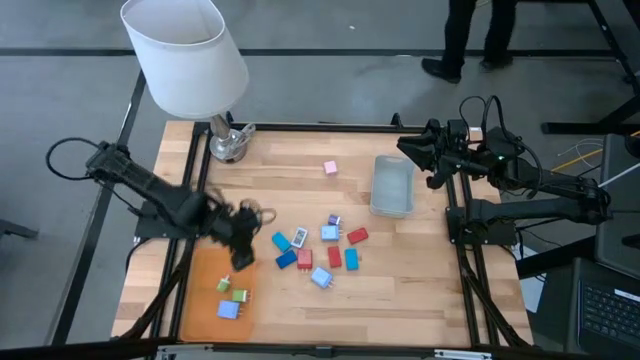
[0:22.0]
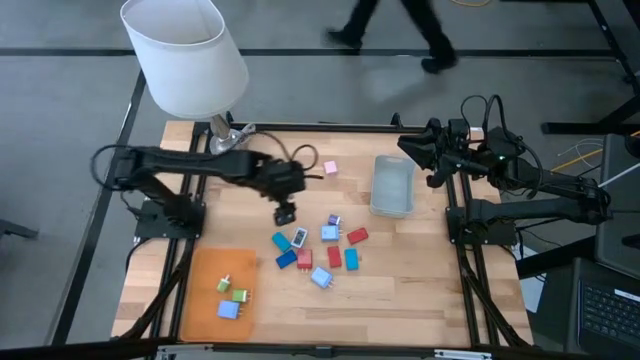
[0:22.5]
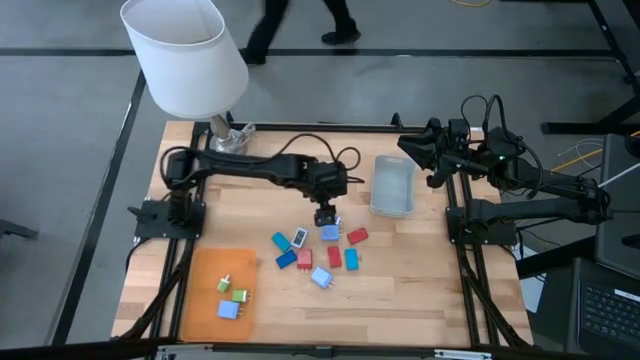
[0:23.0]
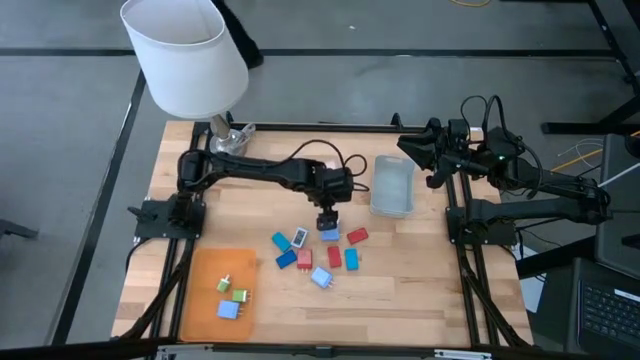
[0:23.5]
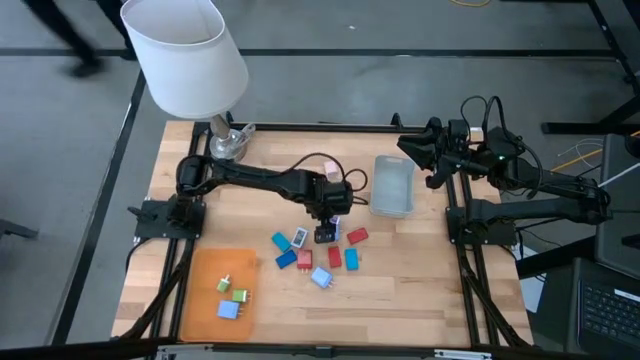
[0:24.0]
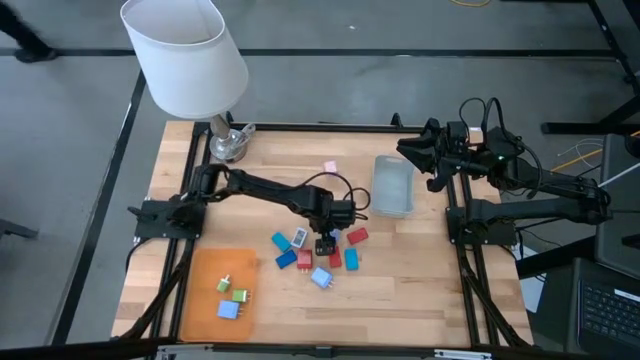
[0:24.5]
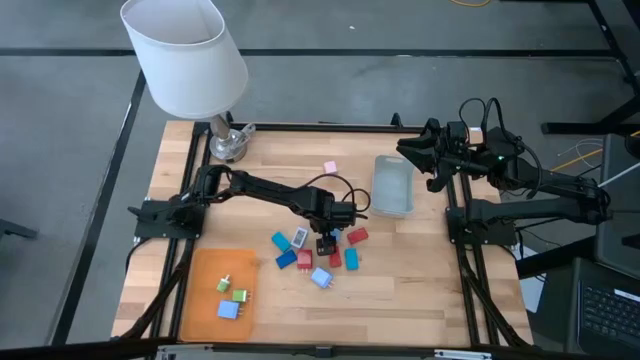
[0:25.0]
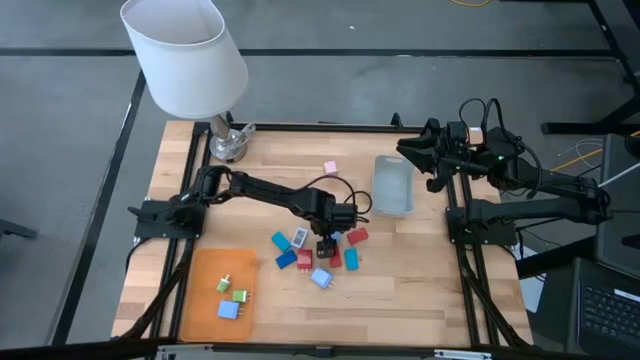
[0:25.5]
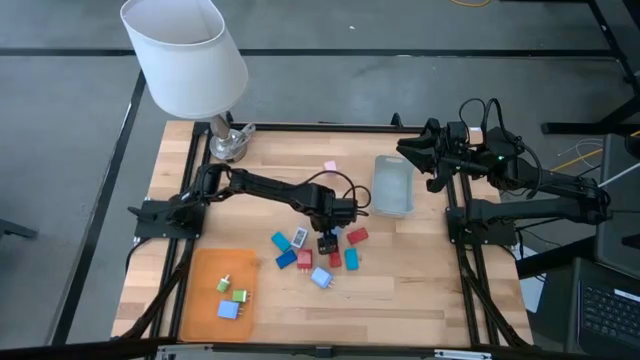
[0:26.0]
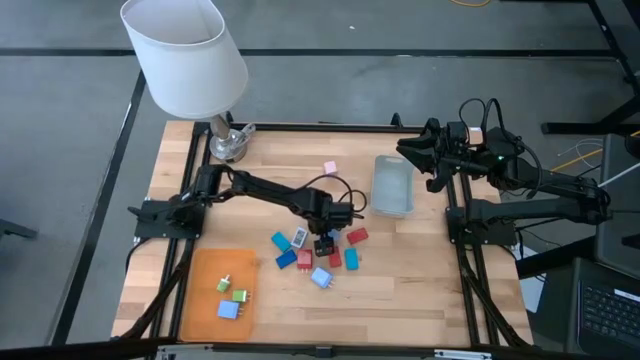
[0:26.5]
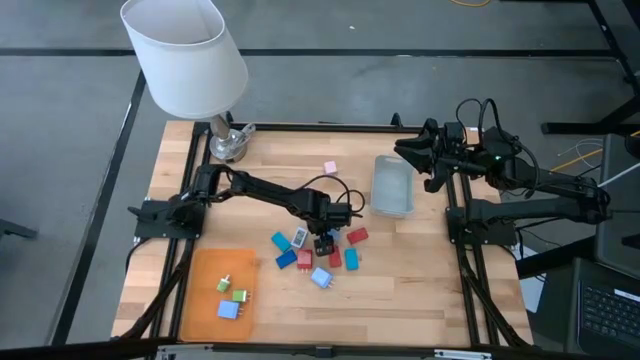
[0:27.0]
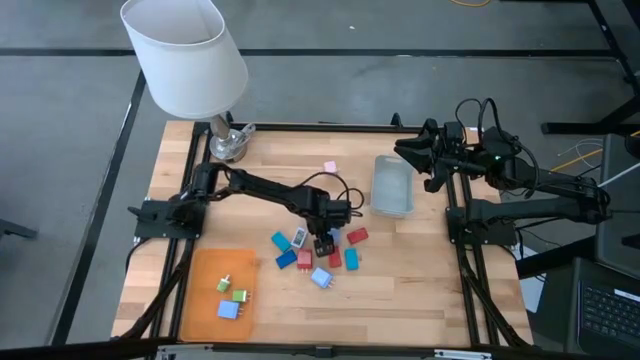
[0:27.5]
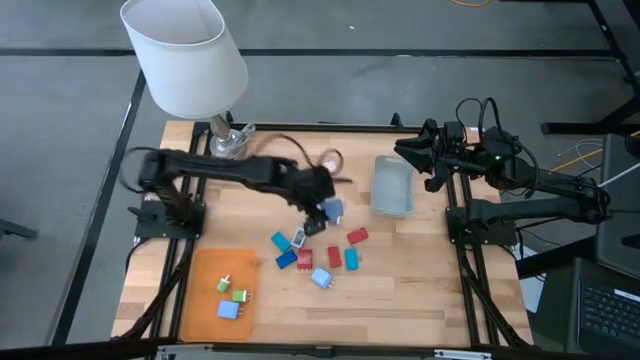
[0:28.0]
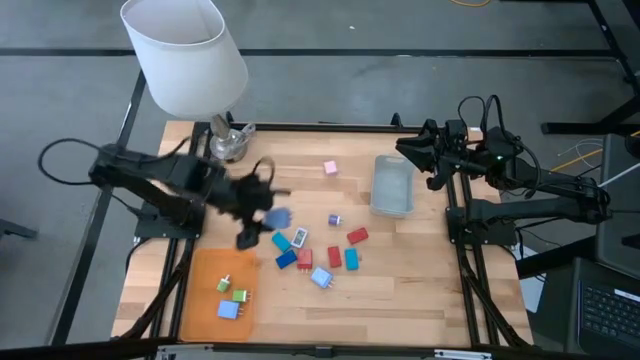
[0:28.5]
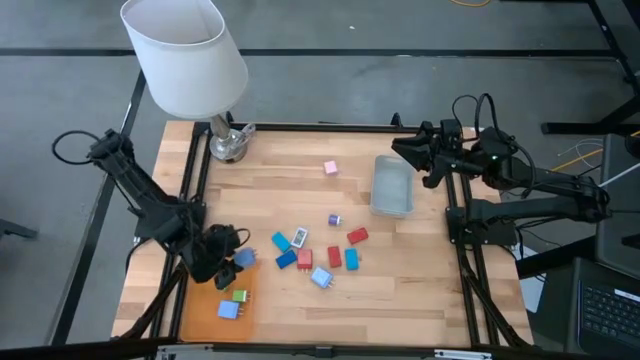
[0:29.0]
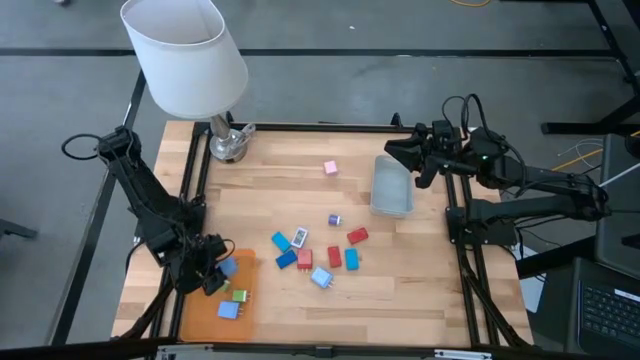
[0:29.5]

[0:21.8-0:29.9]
Task: Pick & Place Office items
Put the top light blue charger adapter into the orange bin

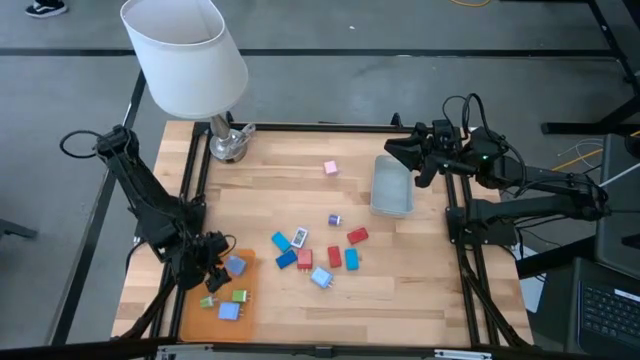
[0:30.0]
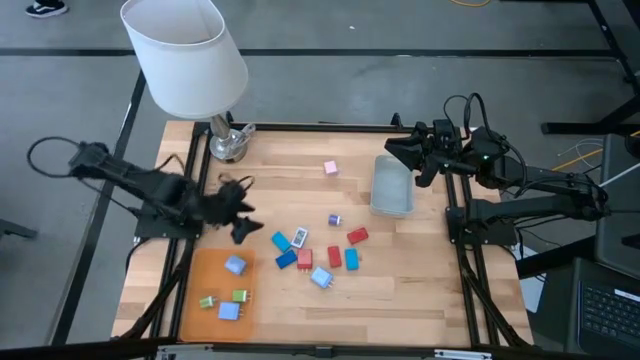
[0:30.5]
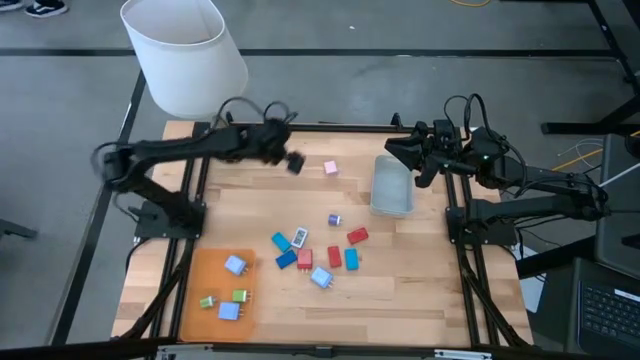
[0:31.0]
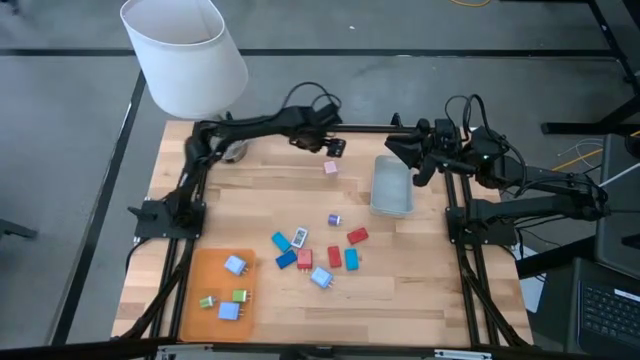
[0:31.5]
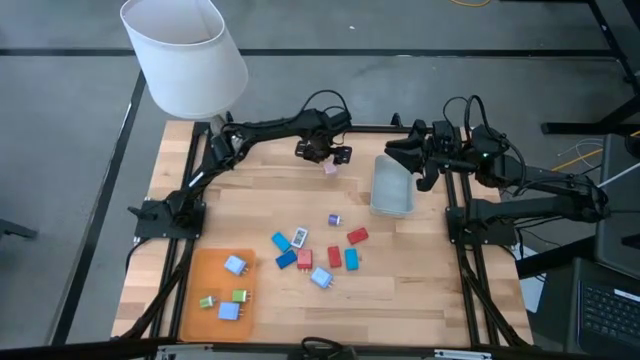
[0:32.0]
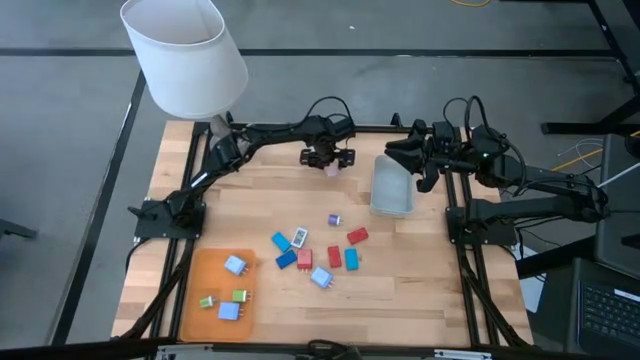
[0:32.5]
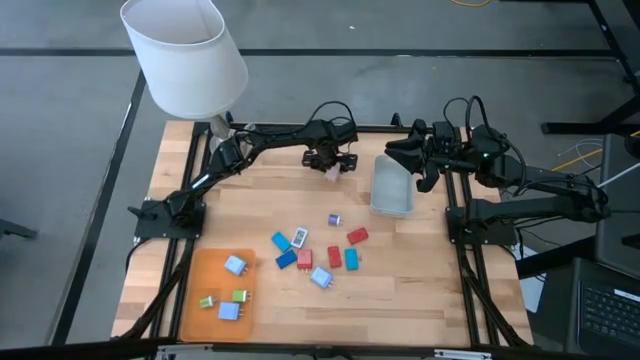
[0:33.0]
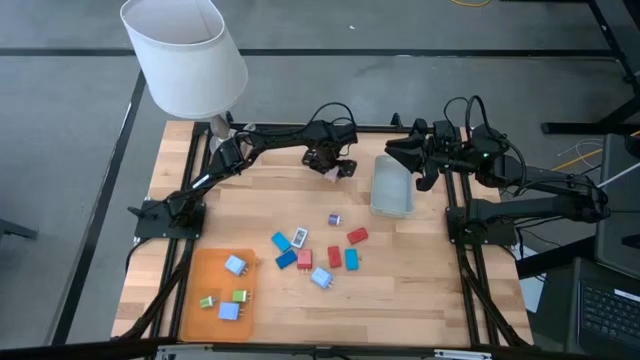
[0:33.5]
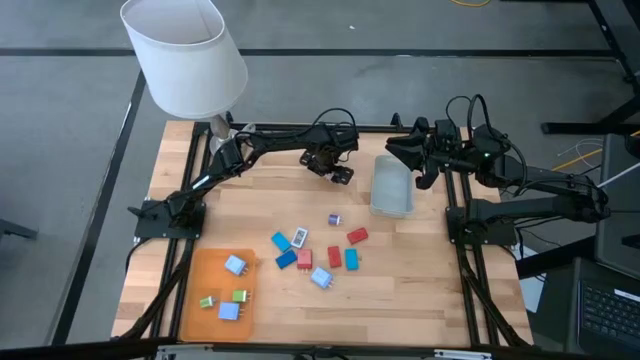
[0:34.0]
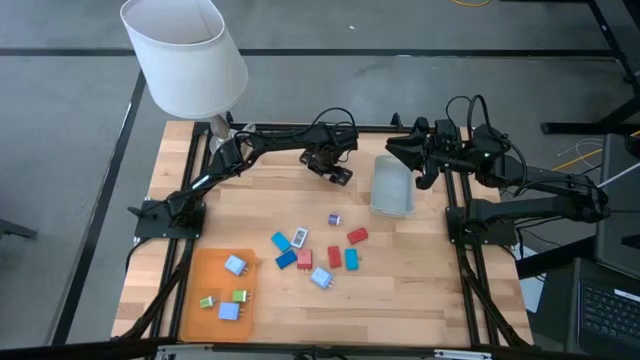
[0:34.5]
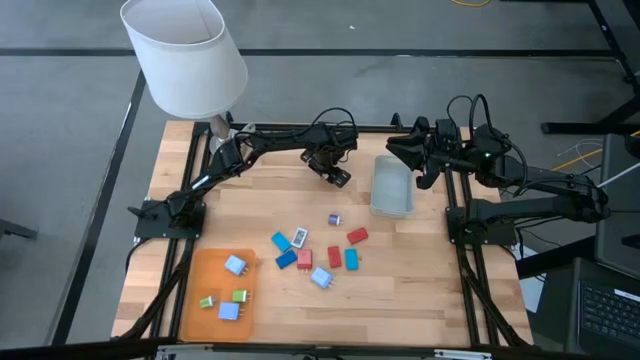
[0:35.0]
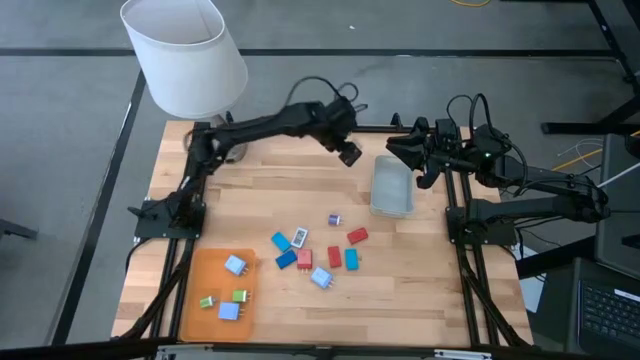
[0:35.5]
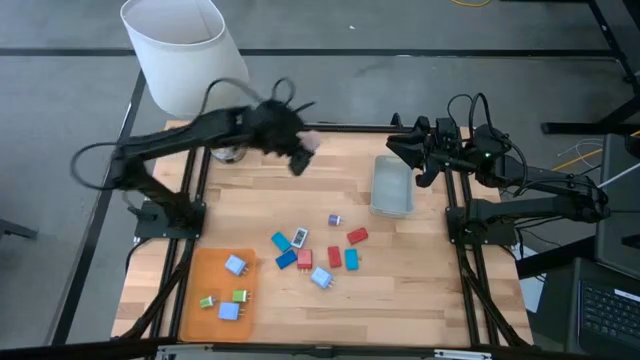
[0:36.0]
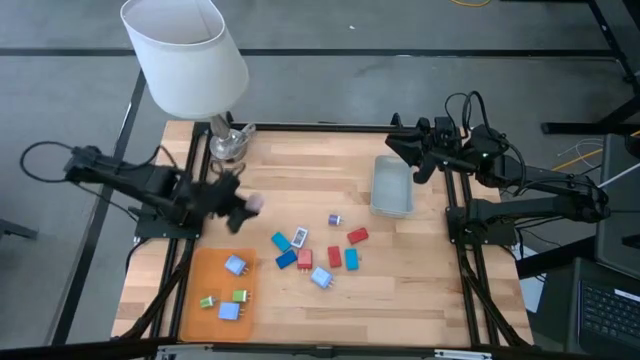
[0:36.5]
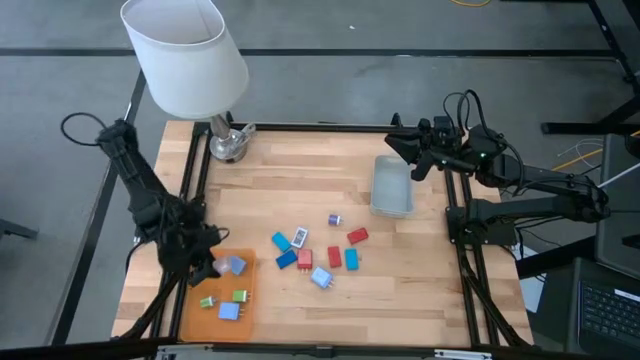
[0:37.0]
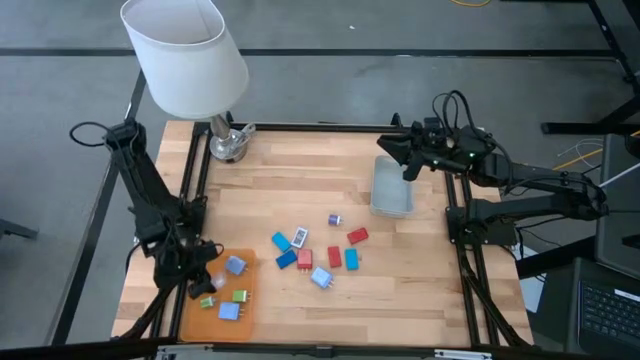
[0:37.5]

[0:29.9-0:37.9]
Put the light pink charger adapter into the orange bin

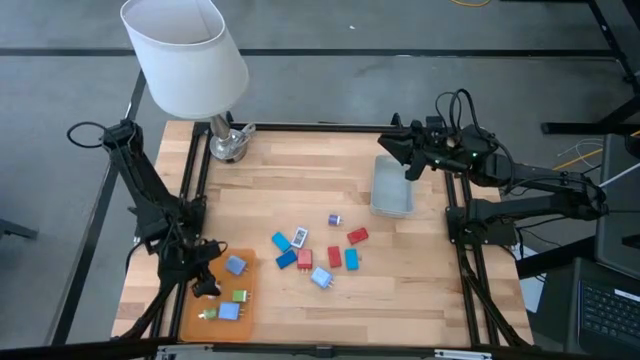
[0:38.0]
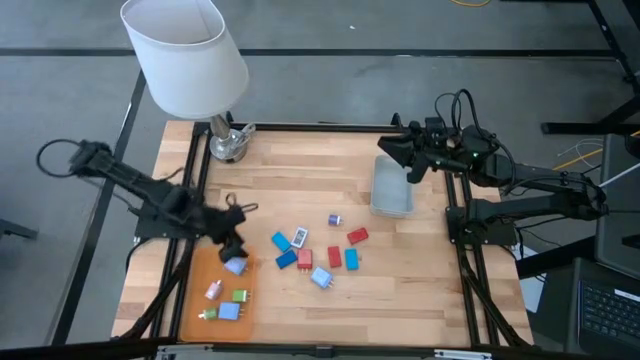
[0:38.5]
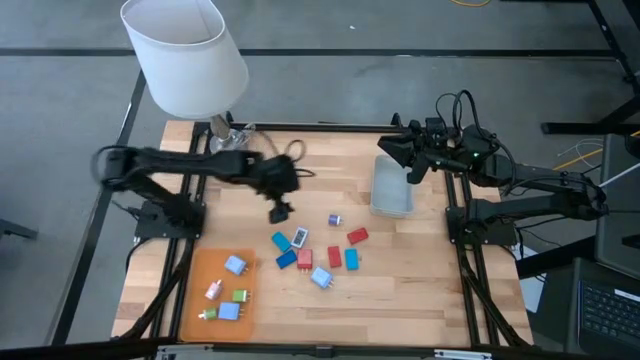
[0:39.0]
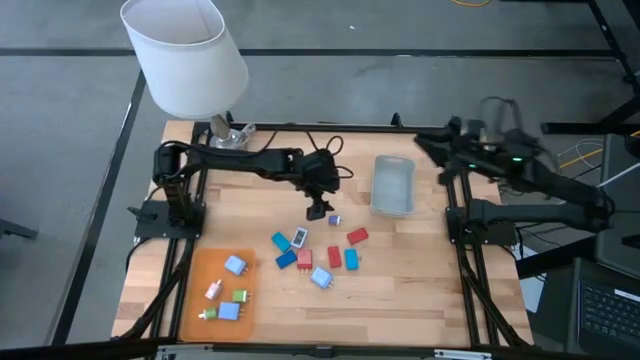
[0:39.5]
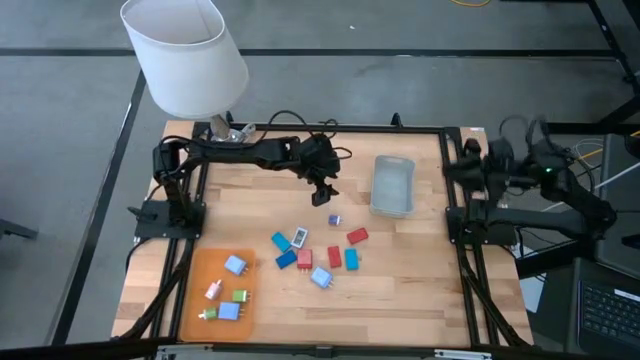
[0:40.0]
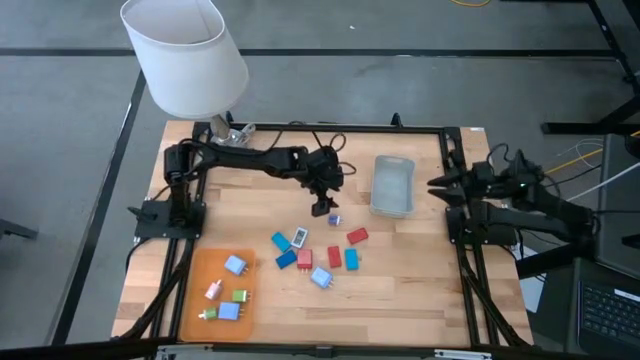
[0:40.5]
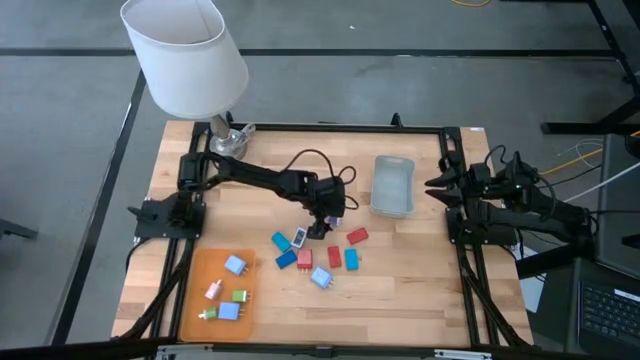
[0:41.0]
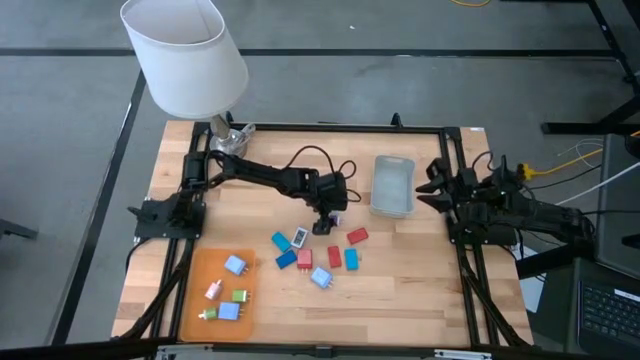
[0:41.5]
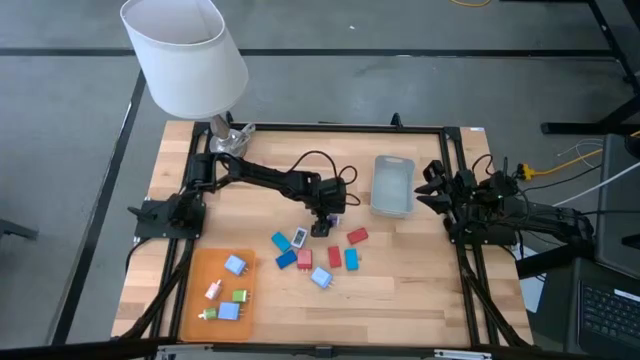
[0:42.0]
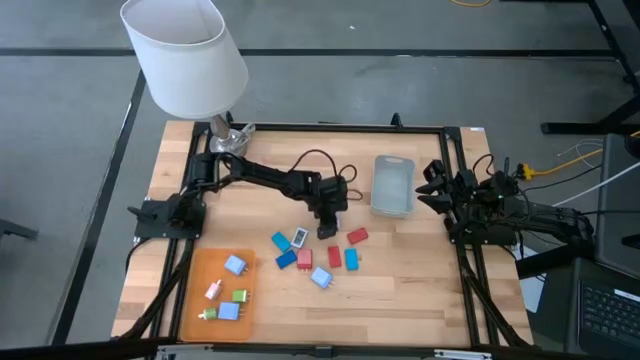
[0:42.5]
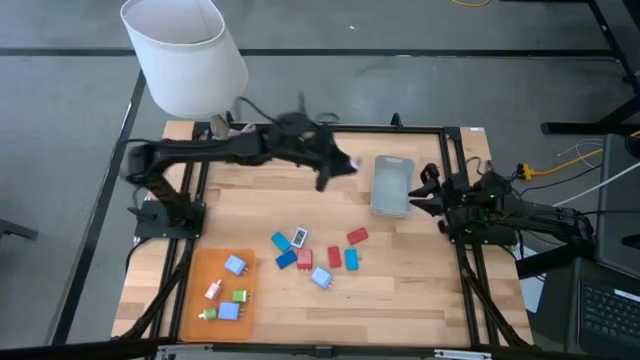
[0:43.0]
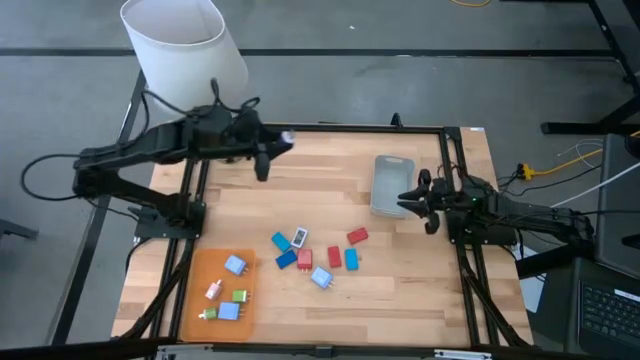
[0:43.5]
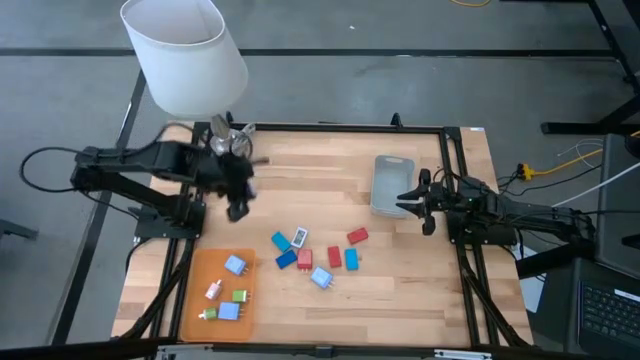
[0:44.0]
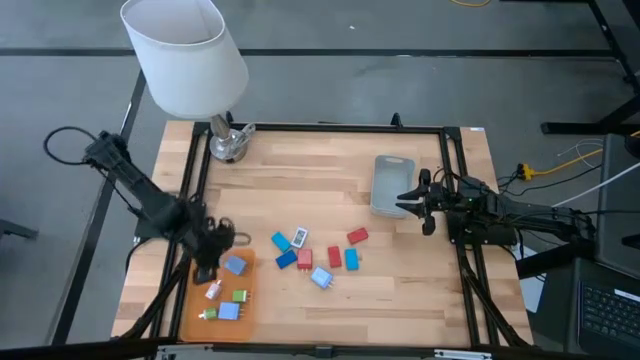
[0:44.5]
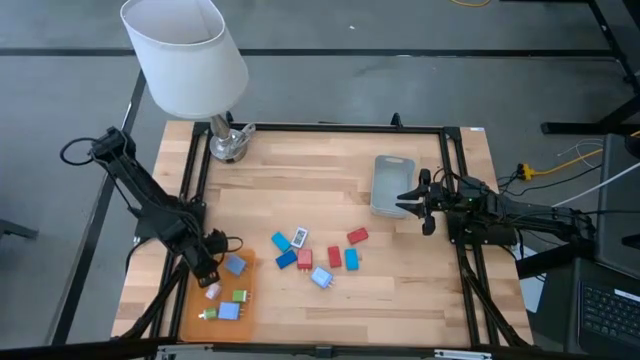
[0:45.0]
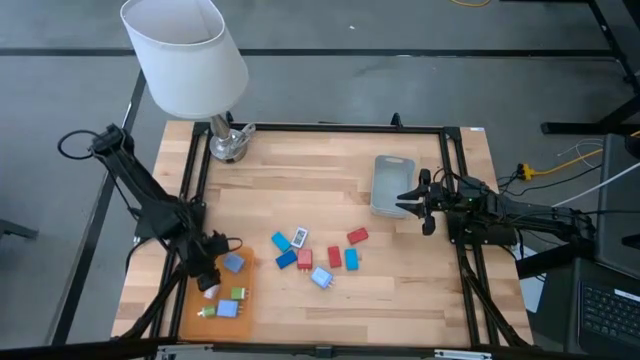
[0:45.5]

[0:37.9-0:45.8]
Put the blue charger adapter into the orange bin
